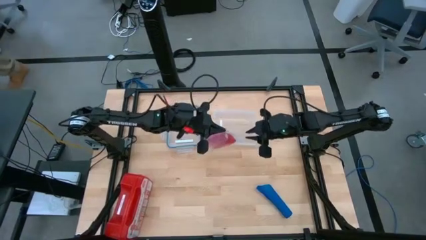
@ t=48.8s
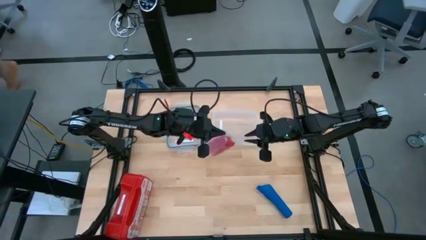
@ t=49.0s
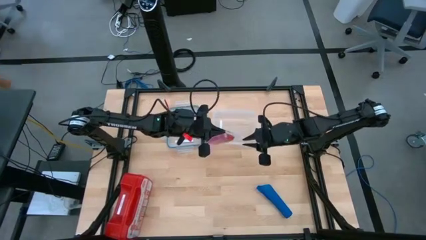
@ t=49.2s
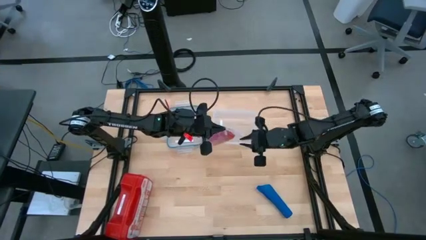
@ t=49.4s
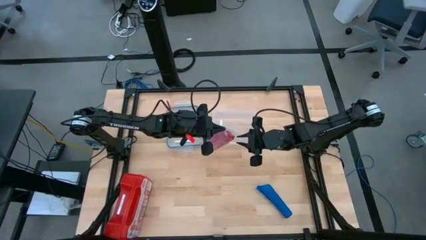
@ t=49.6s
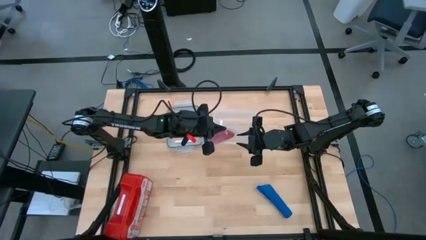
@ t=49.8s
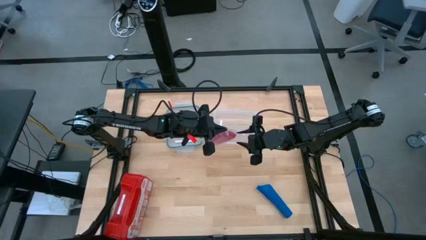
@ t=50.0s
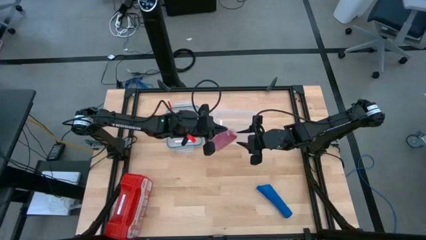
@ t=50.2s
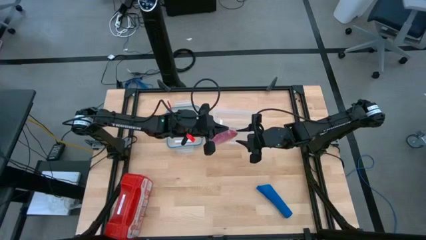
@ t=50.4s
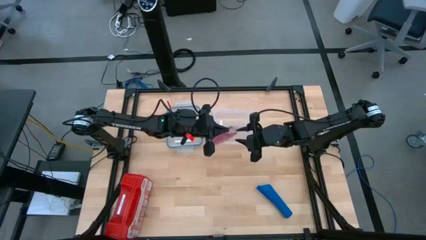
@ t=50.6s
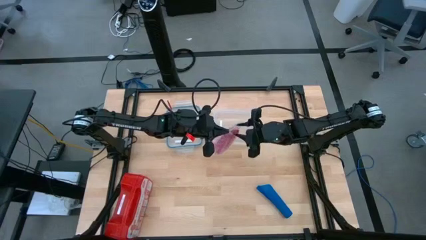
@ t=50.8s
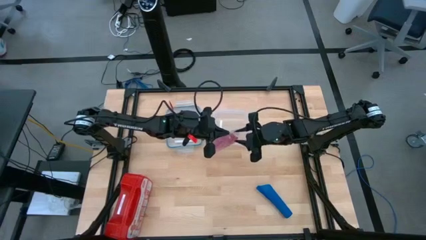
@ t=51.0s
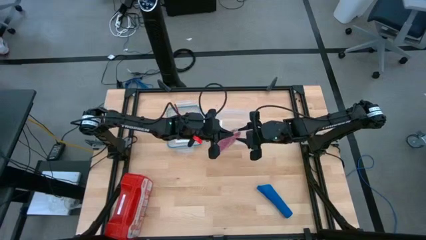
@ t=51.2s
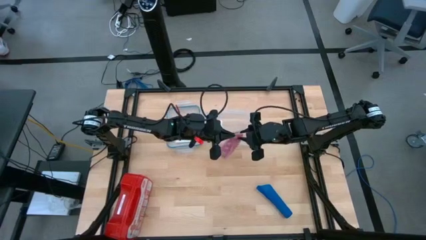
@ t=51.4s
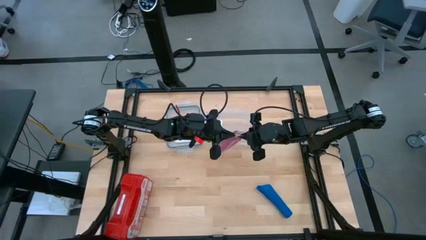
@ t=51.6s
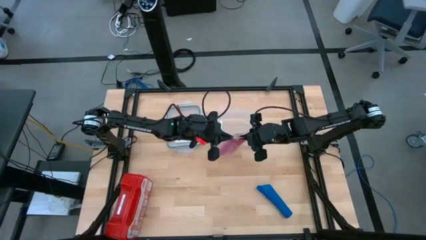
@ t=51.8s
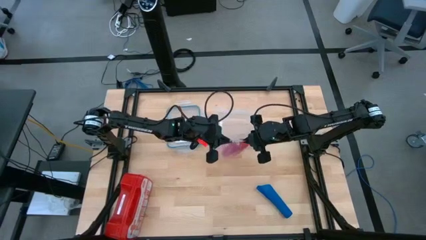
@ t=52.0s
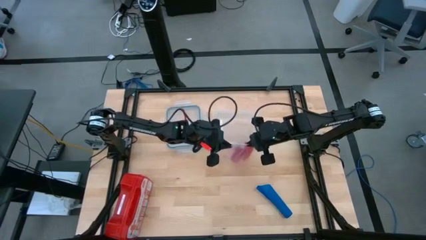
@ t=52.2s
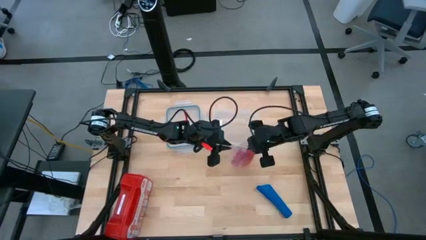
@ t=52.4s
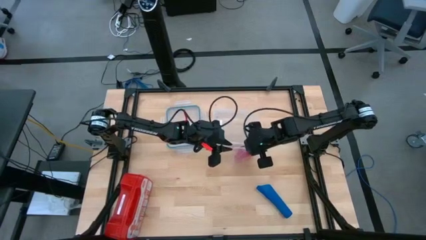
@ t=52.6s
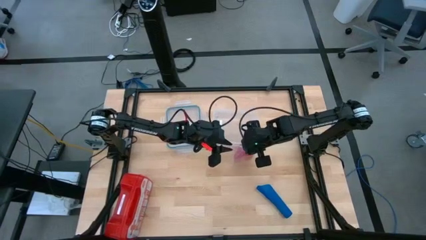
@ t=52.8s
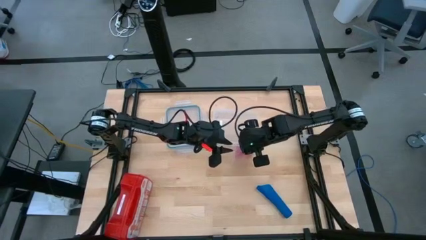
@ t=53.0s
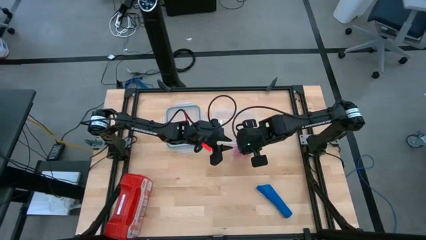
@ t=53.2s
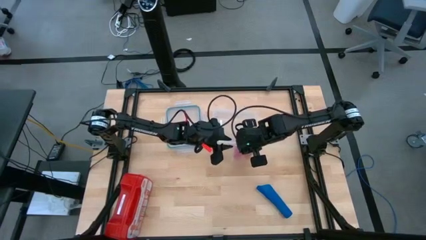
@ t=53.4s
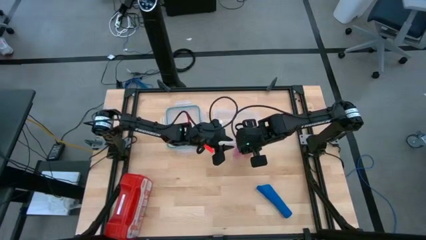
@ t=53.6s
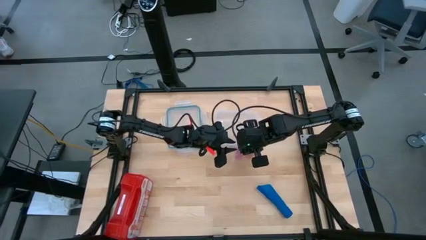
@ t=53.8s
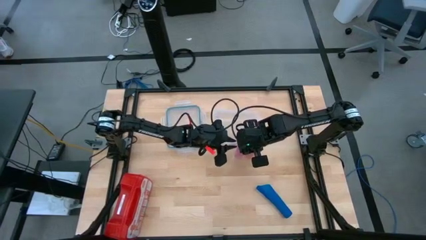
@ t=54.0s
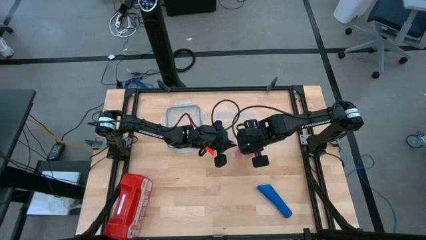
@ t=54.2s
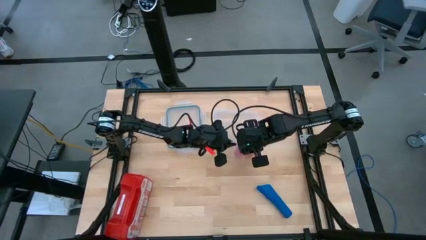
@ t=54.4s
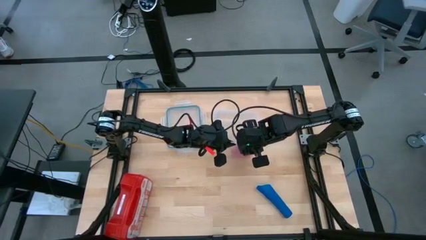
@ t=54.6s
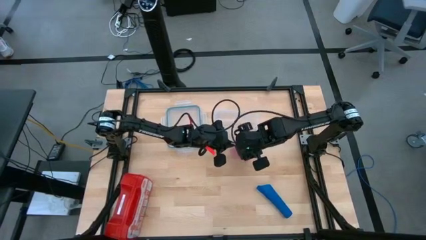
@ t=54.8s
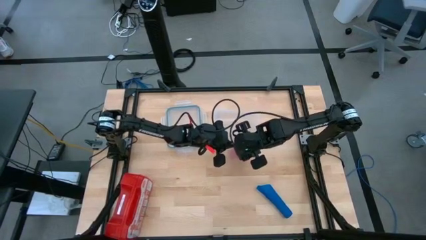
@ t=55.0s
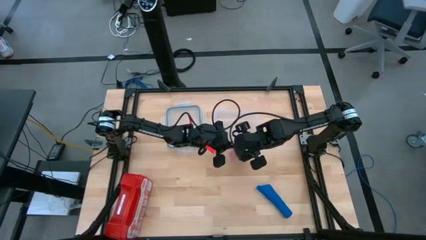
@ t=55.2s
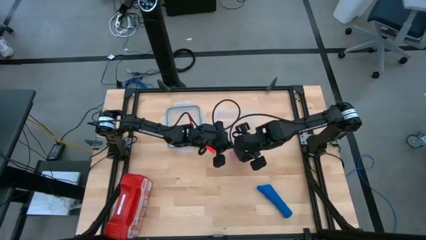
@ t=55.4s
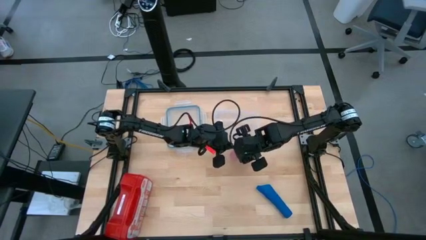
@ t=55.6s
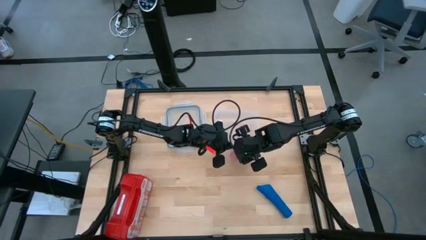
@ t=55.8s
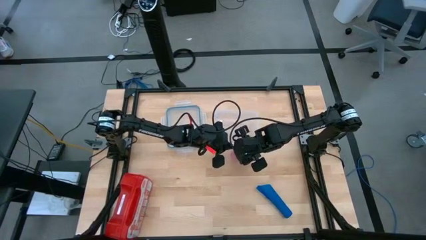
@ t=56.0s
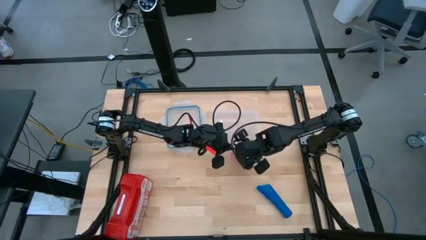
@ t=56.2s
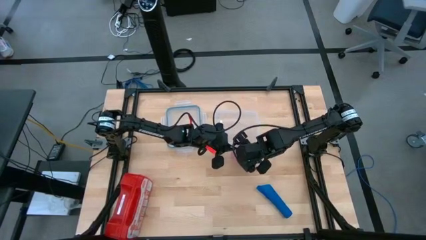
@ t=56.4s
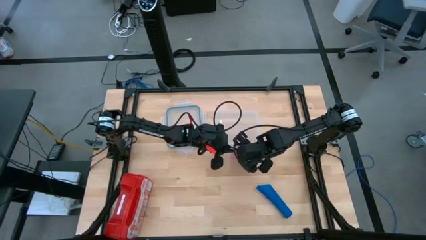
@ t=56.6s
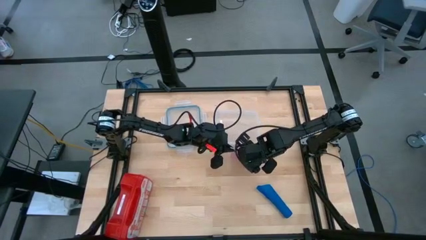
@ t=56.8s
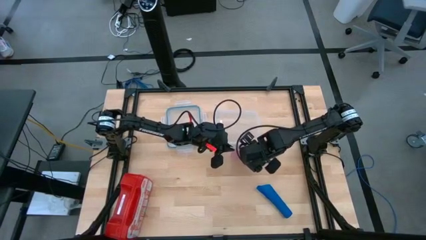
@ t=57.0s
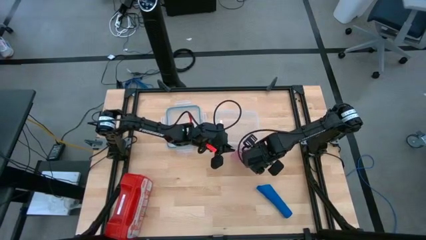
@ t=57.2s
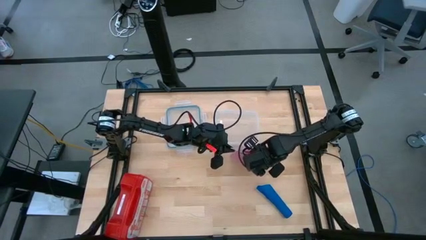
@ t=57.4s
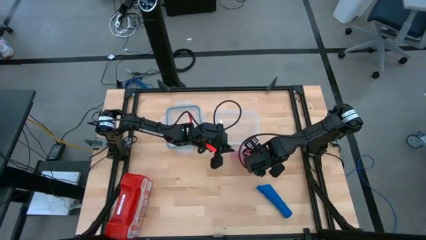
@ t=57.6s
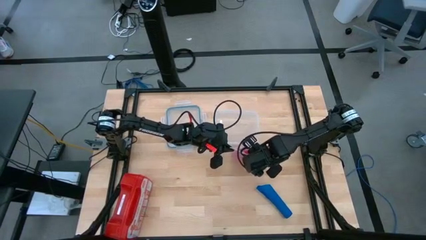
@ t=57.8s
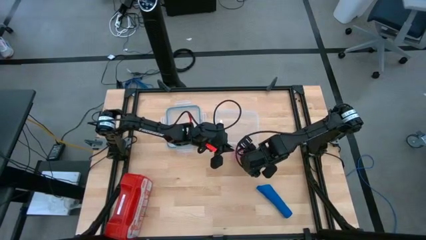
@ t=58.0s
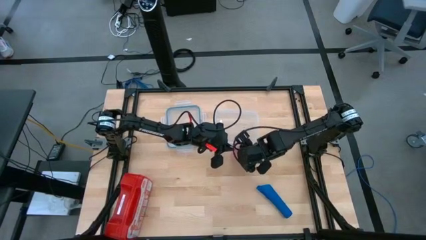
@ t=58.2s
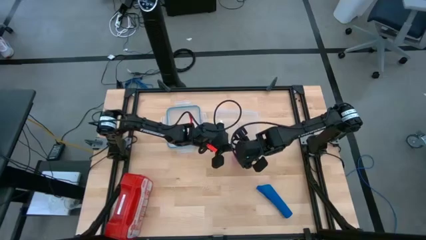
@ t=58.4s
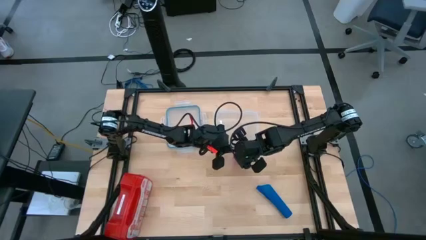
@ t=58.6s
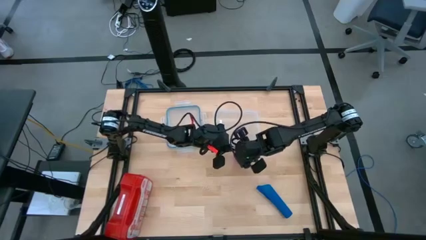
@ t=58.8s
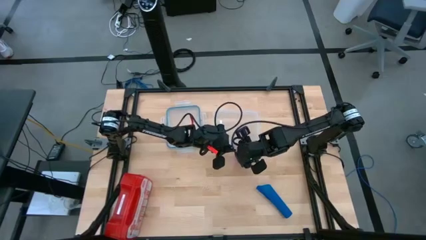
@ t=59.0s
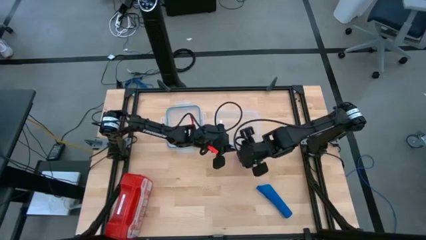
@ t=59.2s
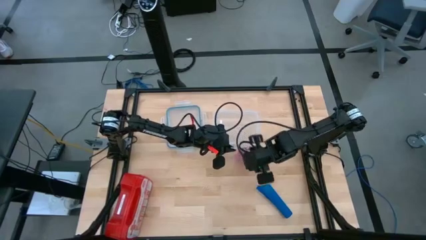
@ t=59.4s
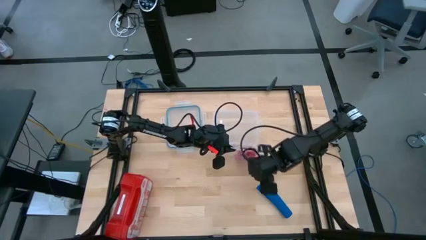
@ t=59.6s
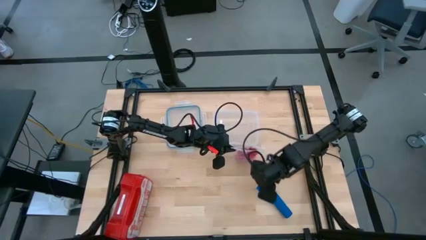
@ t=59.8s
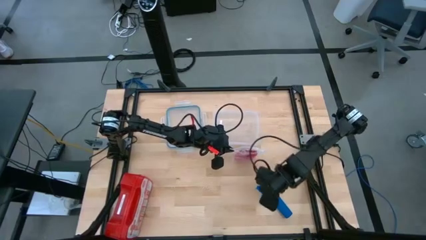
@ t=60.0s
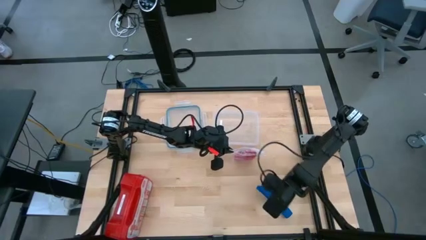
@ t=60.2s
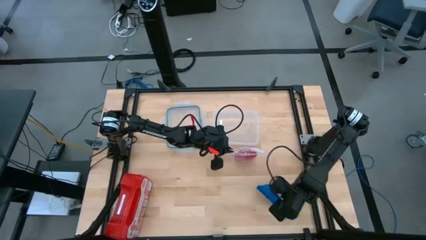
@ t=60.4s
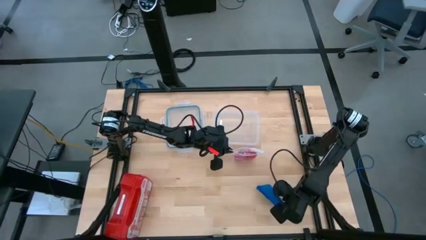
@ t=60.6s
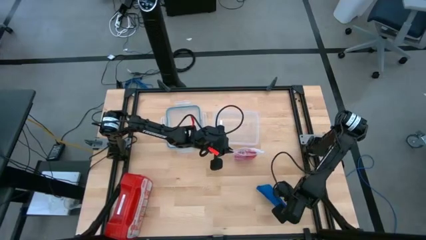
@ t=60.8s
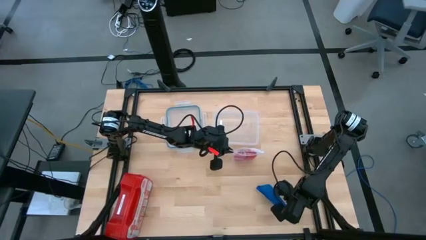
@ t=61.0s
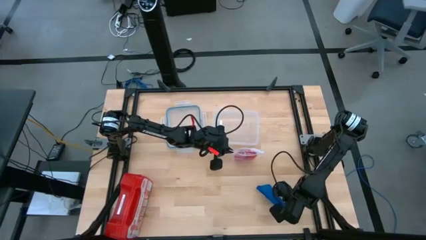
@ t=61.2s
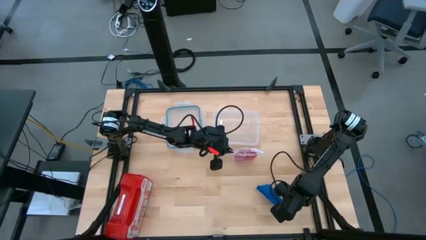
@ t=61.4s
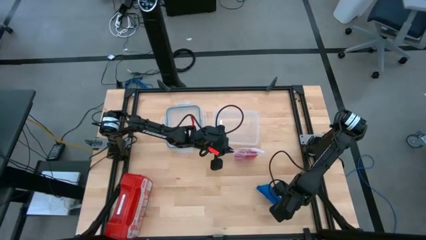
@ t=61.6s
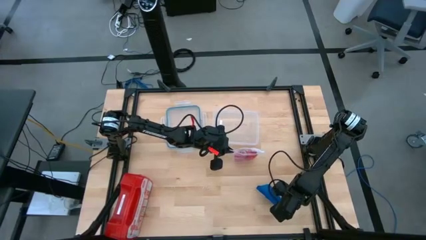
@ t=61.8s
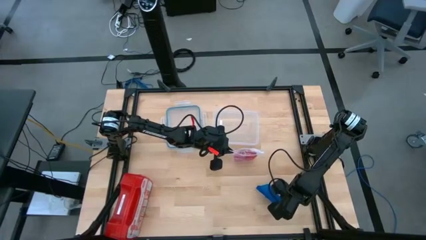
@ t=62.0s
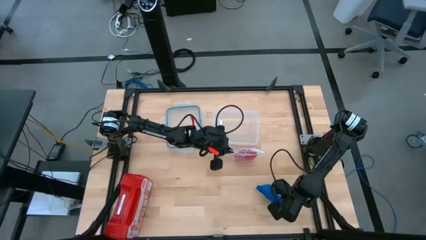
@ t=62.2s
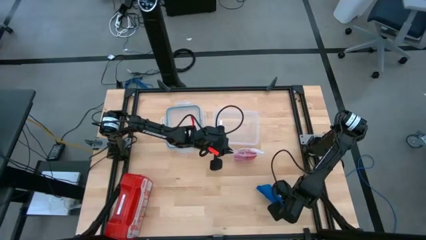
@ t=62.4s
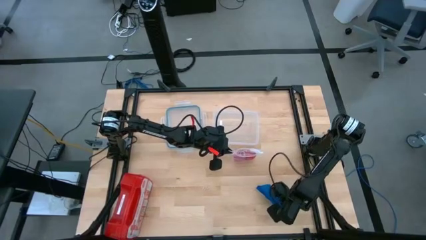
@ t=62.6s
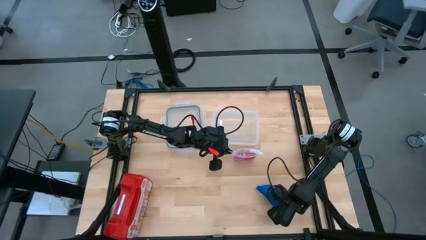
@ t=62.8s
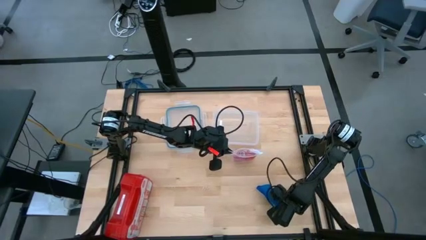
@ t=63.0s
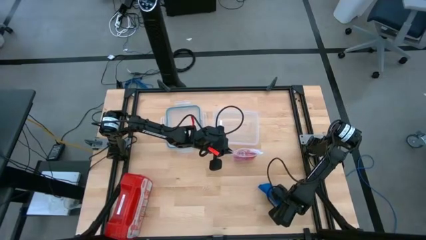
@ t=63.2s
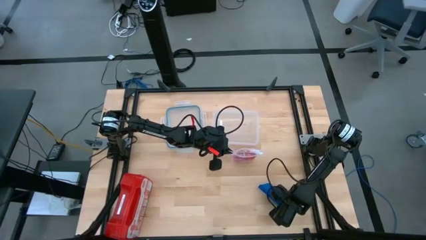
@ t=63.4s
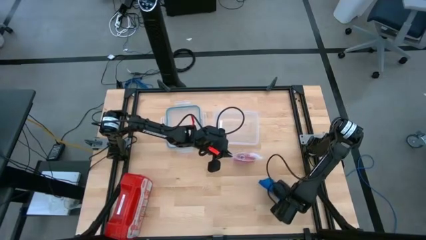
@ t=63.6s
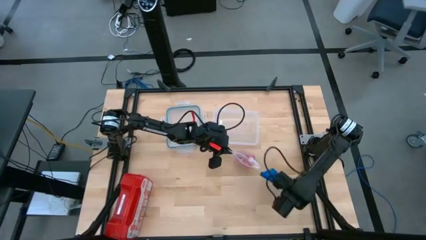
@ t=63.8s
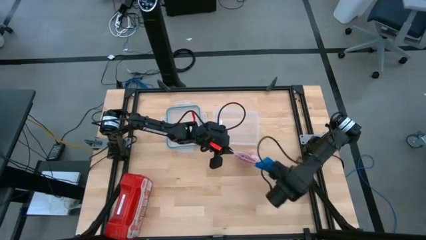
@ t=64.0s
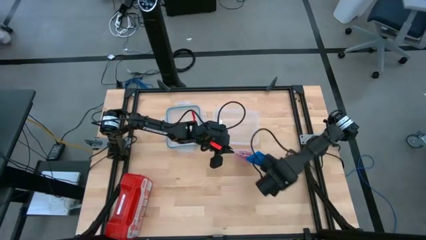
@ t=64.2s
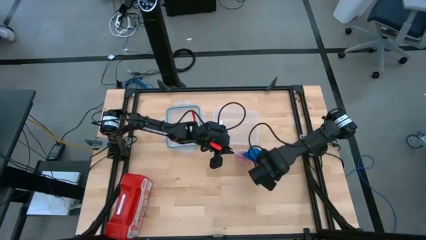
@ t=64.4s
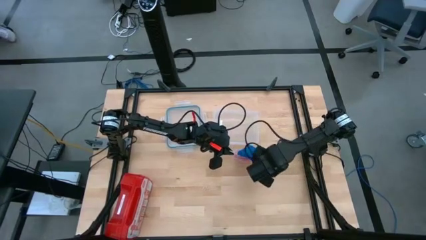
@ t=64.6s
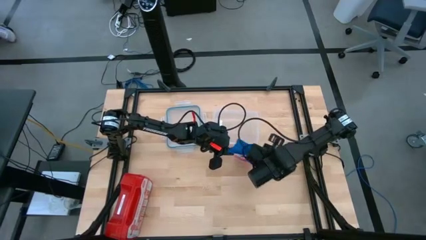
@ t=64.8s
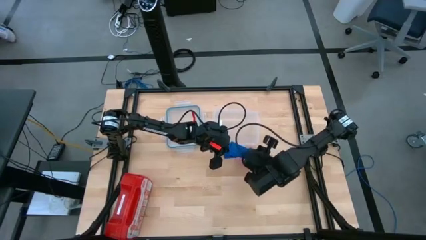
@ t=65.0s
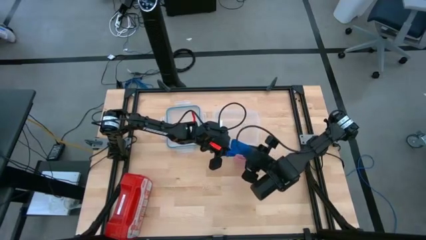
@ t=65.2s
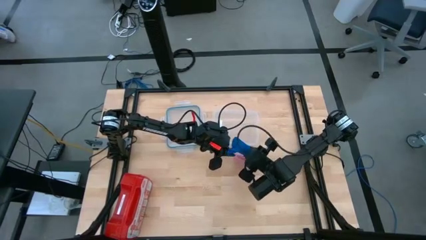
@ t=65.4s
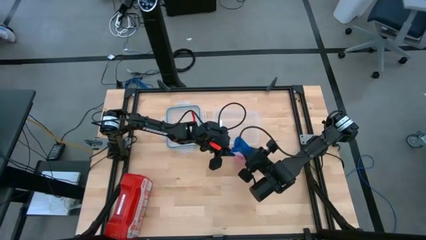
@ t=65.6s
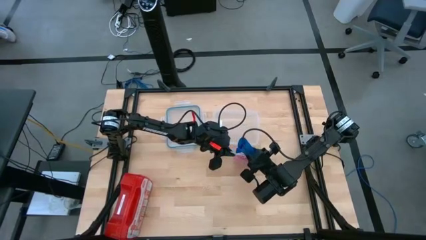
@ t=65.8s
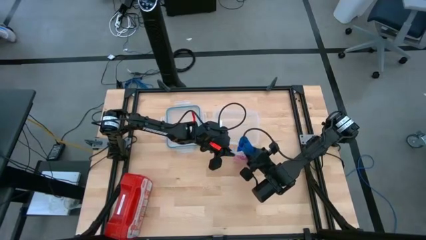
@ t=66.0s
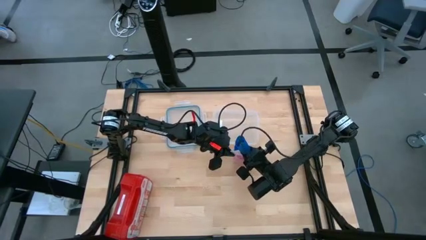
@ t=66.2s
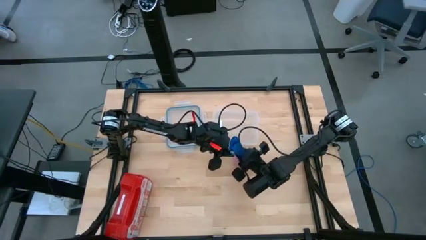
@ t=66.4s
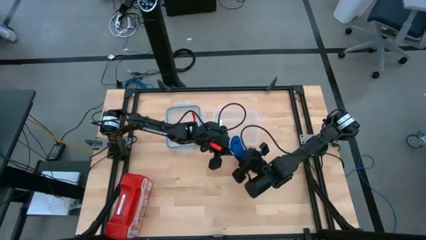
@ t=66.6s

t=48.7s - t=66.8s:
Task: Roll bandage
Put the blue bandage into the transparent zip bag
